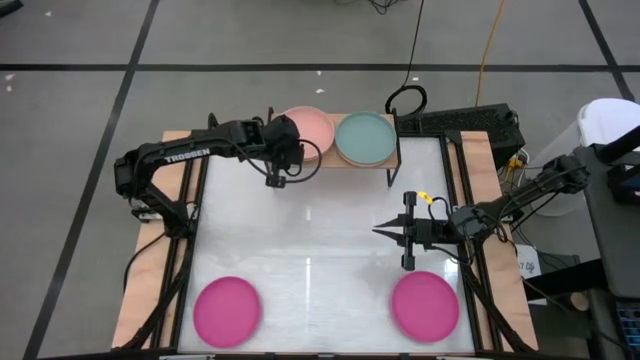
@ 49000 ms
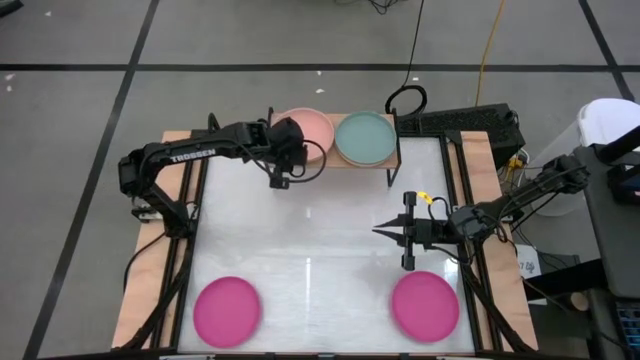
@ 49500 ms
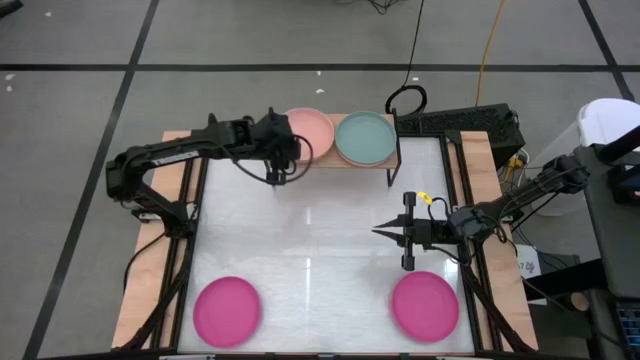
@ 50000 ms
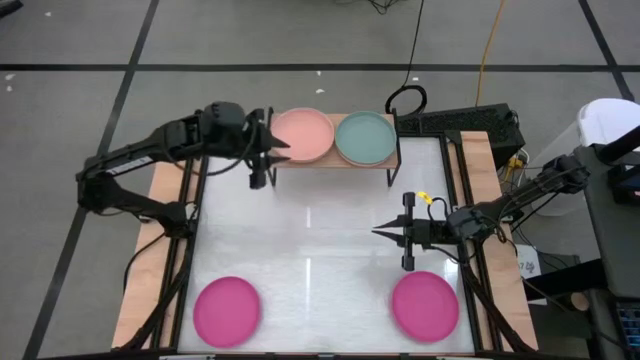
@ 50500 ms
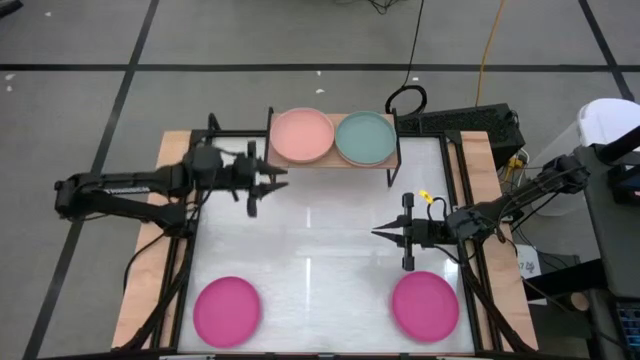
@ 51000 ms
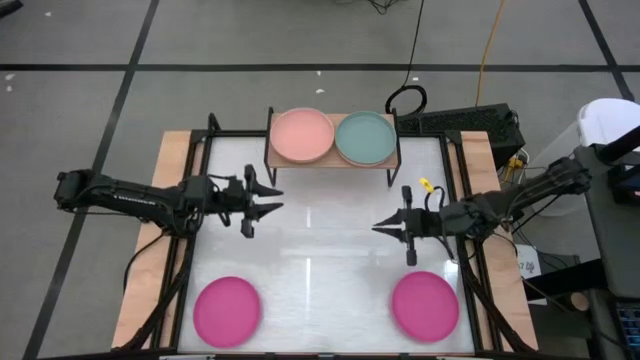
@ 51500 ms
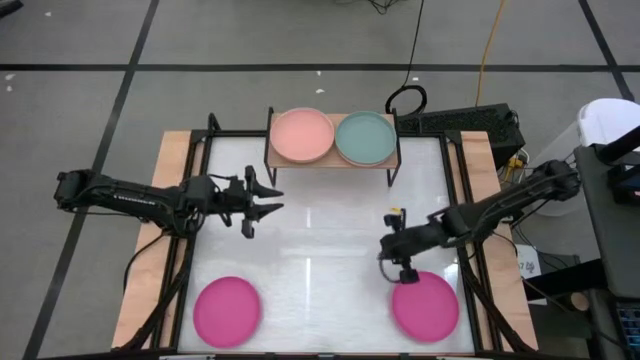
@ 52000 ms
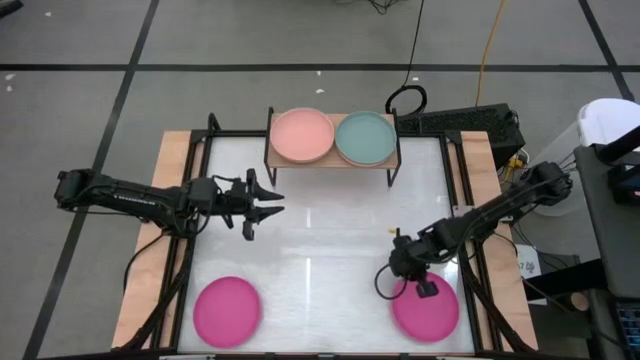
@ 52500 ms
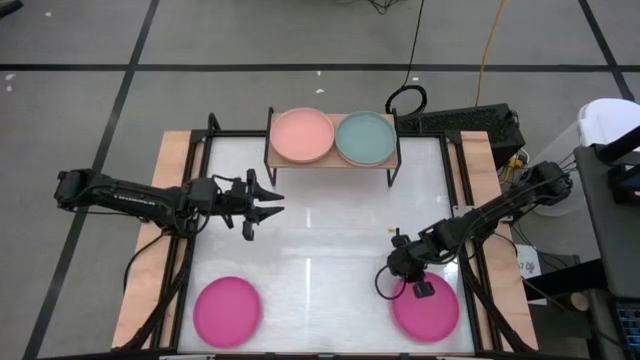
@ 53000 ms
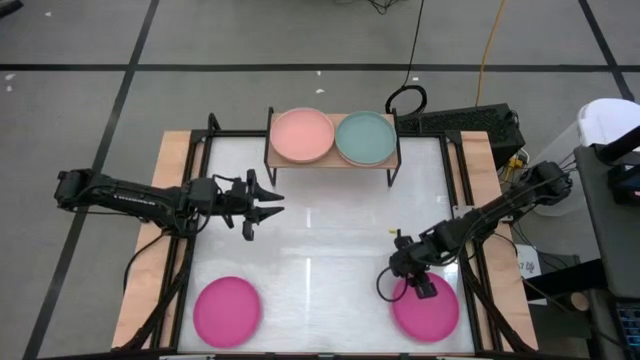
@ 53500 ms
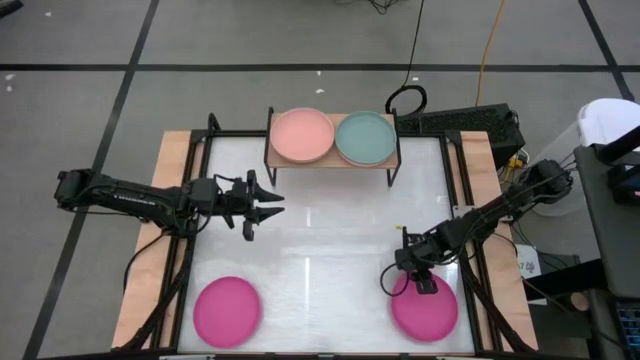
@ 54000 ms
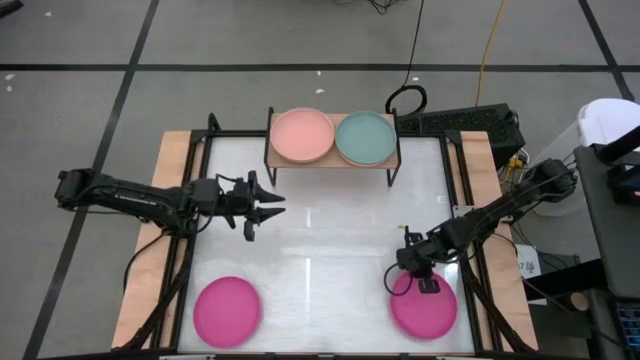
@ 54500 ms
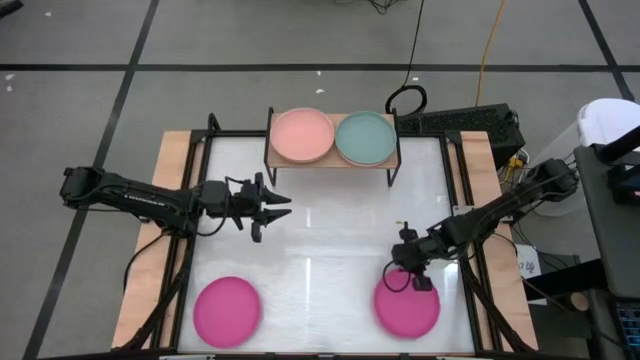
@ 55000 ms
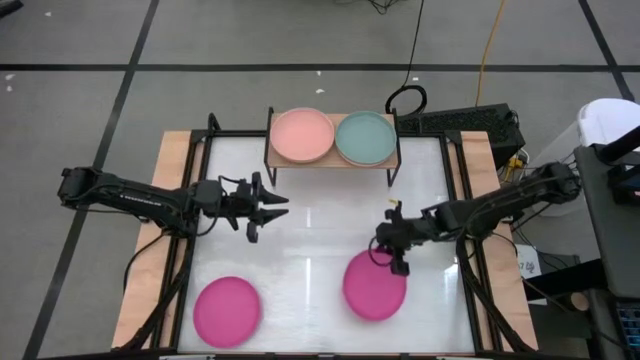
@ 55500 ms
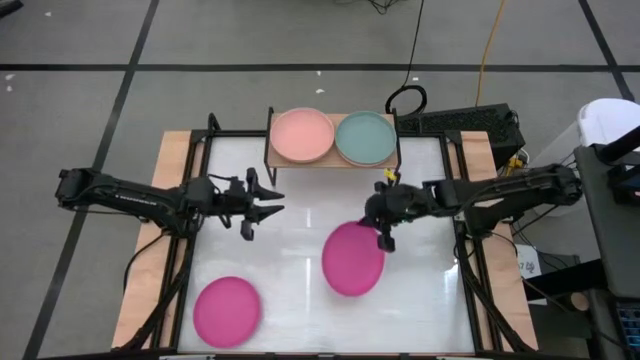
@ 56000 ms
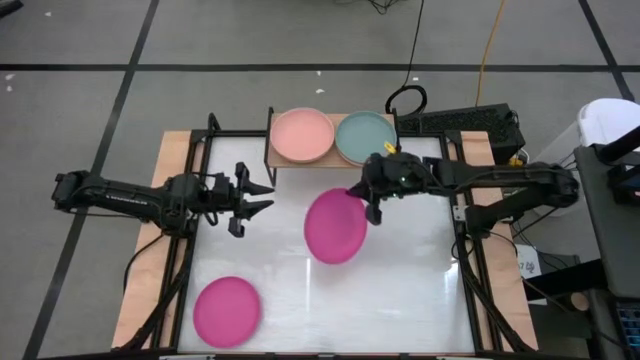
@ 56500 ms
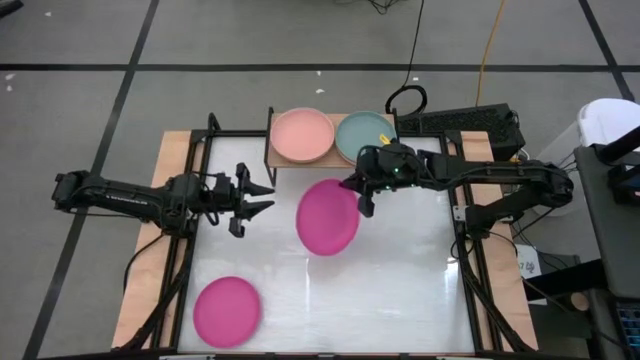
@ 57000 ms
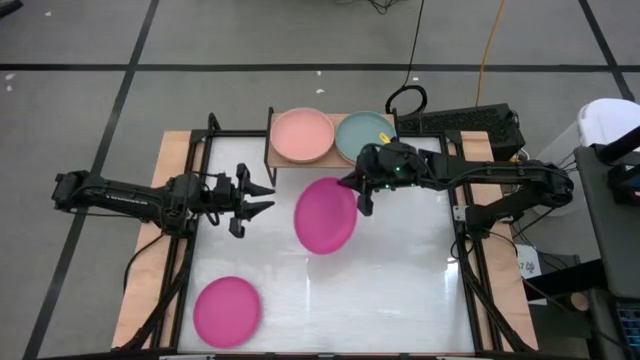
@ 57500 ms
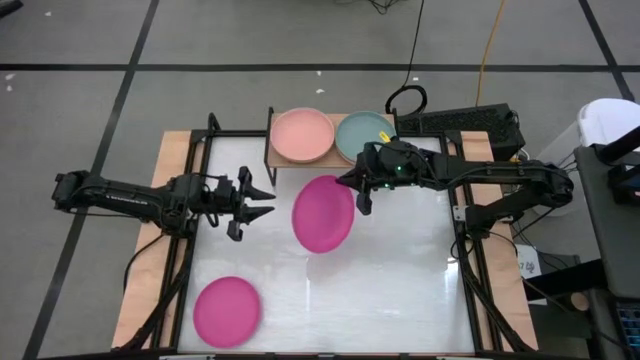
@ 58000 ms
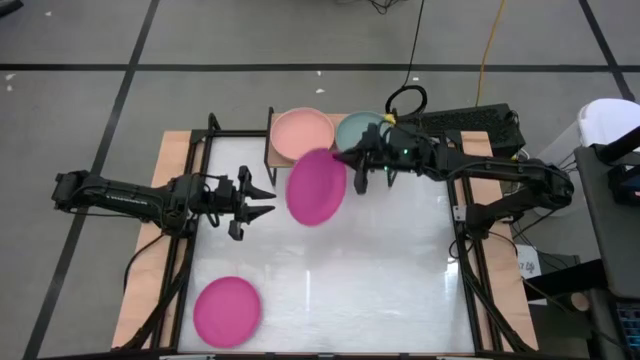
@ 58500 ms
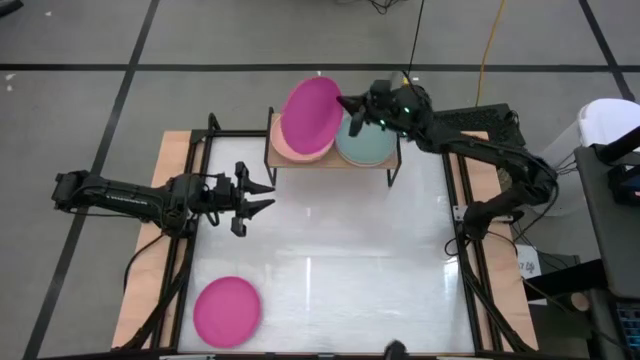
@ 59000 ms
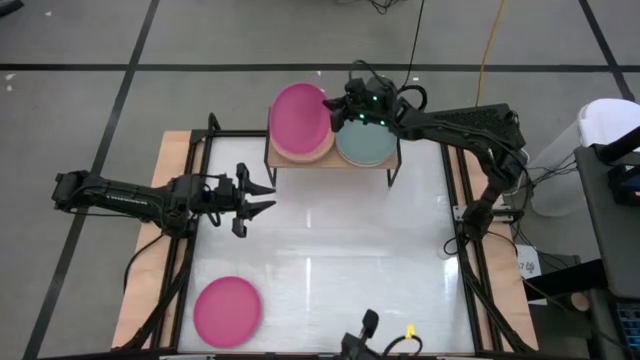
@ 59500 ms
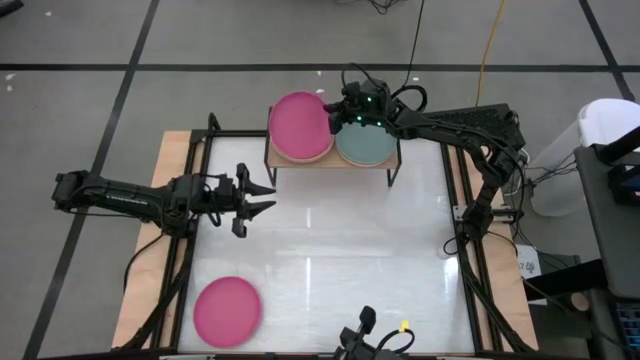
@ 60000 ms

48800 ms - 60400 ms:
Task: Place and stack plates onto a shelf
Stack the right pink plate on the light brown plate

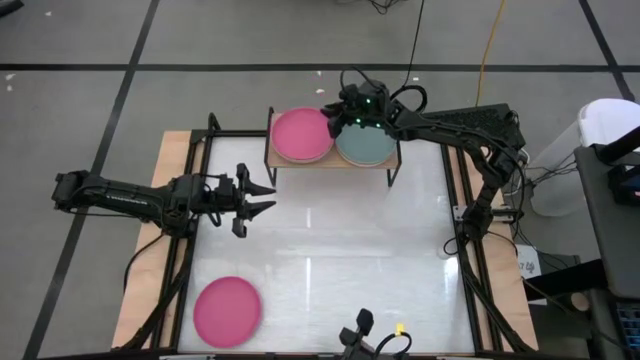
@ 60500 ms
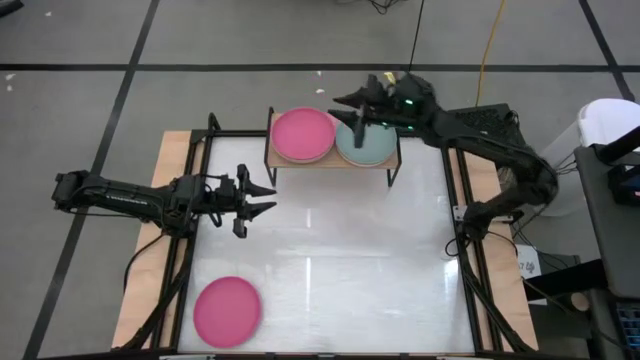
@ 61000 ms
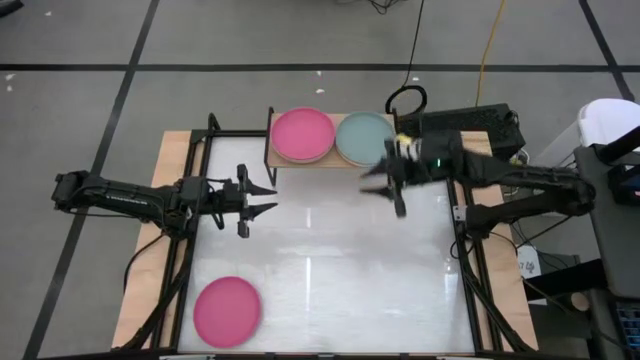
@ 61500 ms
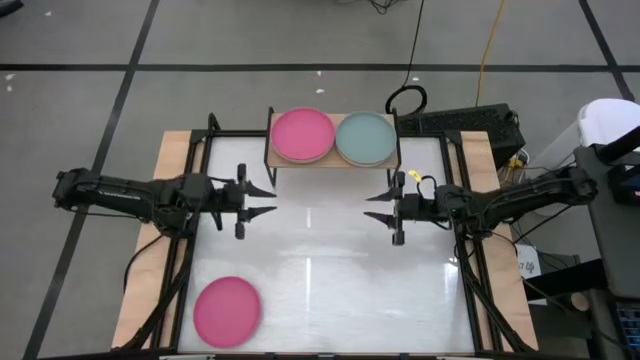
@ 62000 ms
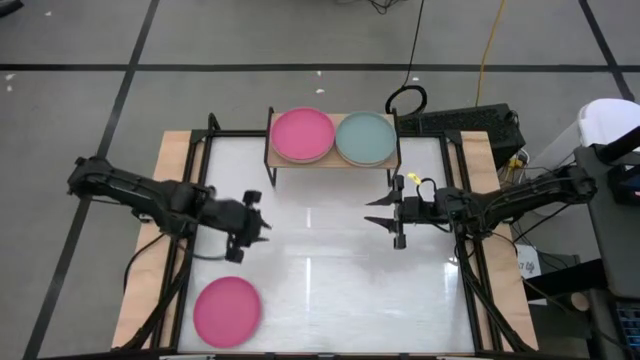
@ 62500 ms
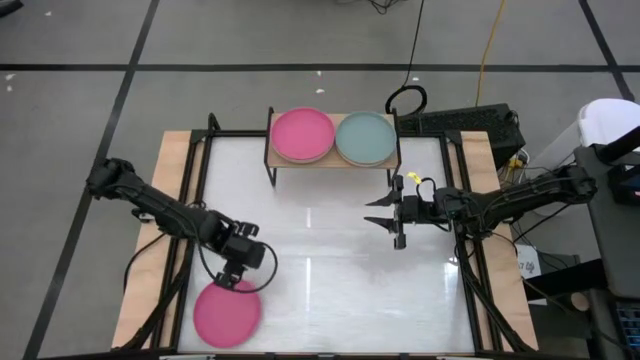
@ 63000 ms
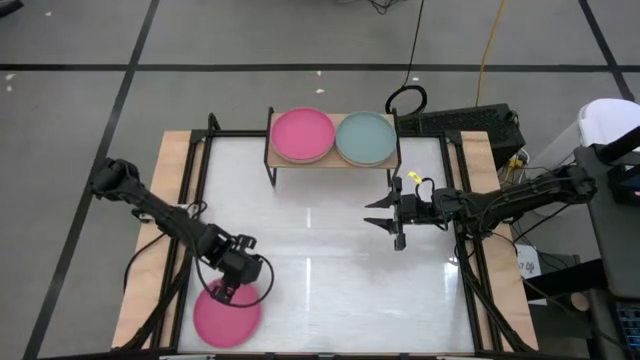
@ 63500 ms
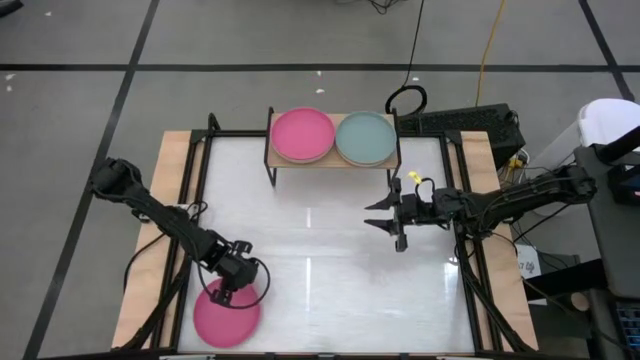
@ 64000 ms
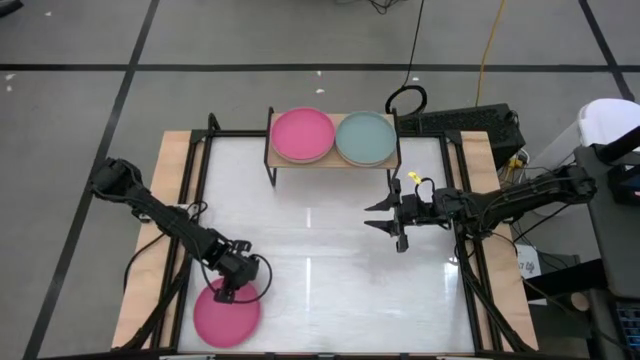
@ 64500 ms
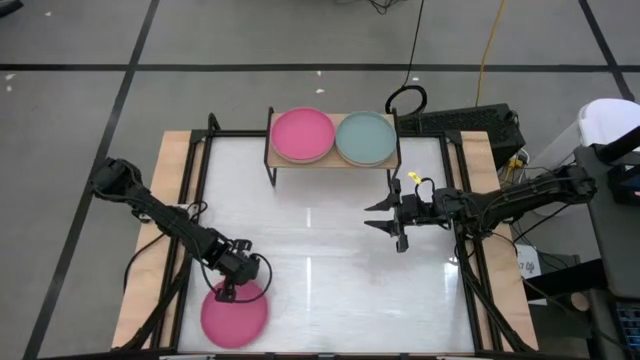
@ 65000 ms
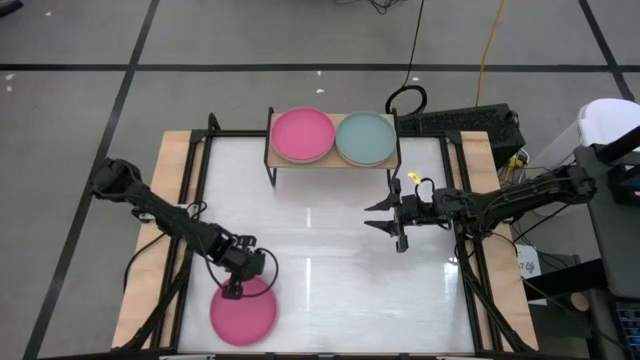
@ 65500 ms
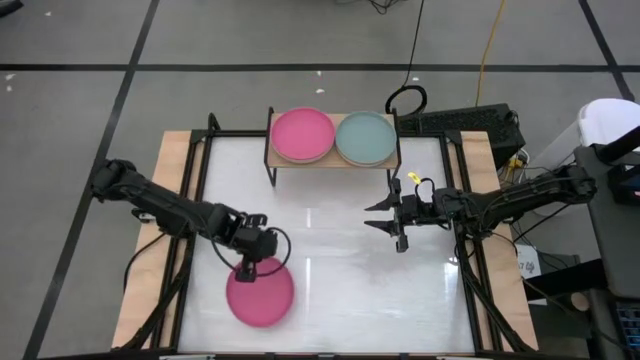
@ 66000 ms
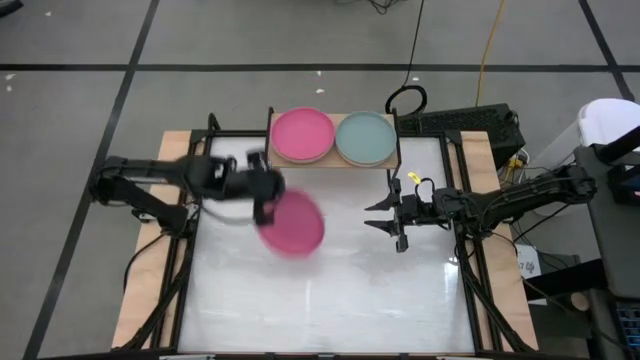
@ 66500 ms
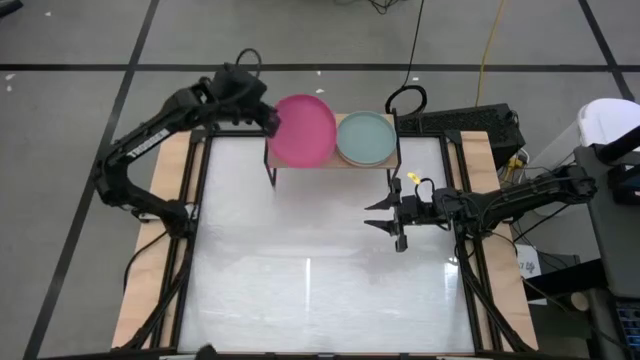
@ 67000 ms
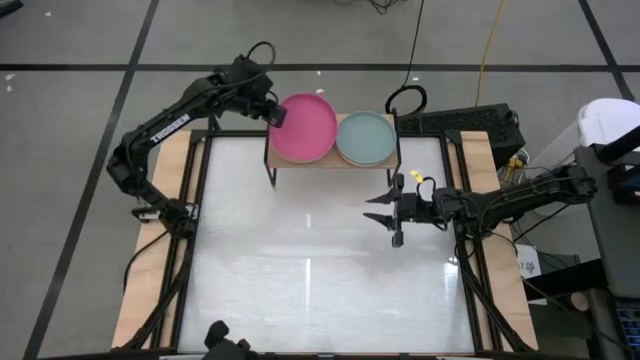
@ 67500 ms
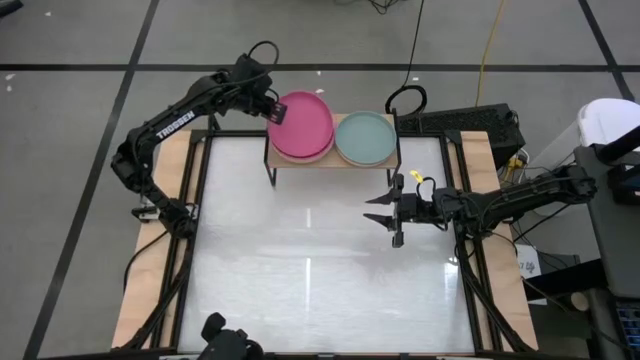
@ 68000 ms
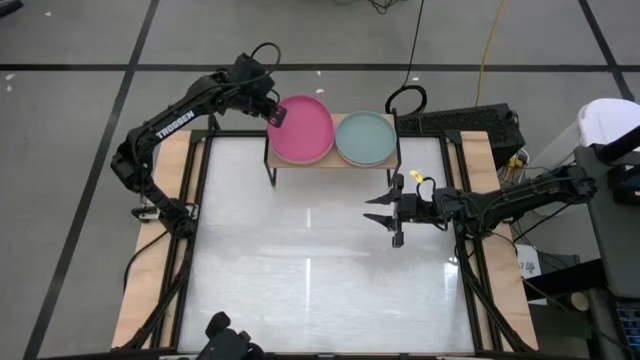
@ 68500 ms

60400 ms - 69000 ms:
Stack the pink plate on the other pink plate
